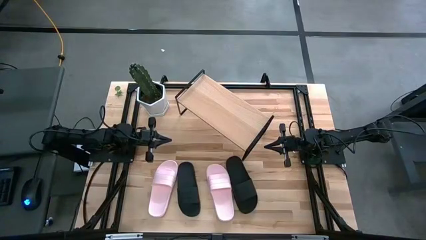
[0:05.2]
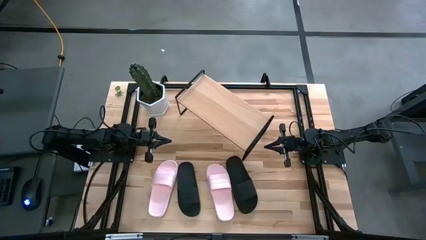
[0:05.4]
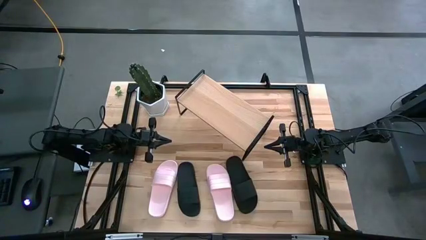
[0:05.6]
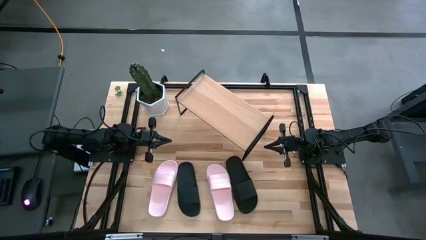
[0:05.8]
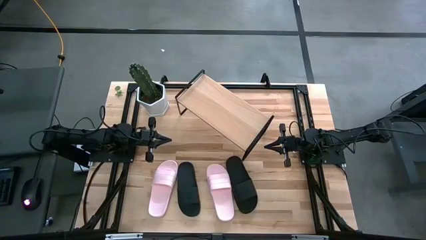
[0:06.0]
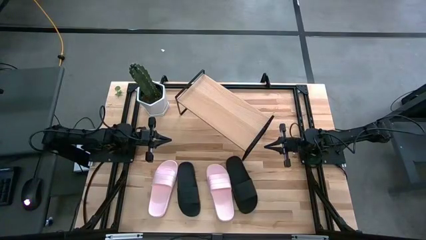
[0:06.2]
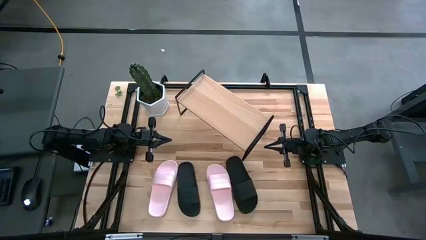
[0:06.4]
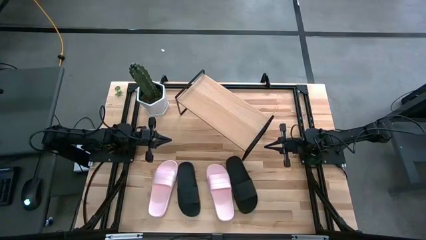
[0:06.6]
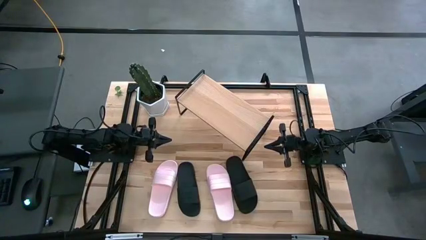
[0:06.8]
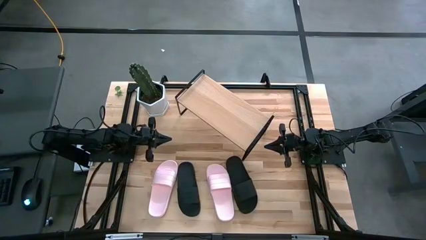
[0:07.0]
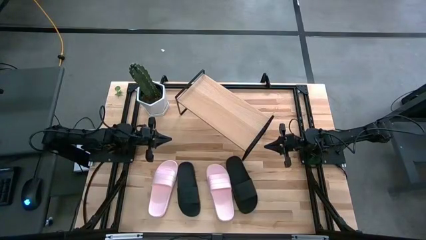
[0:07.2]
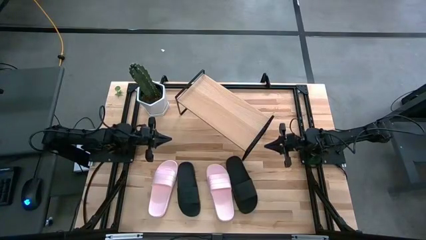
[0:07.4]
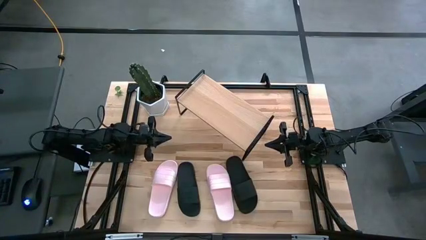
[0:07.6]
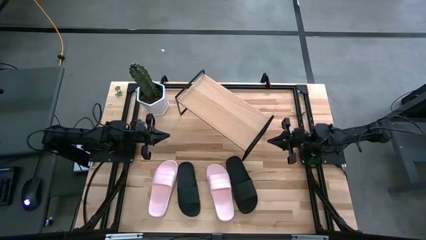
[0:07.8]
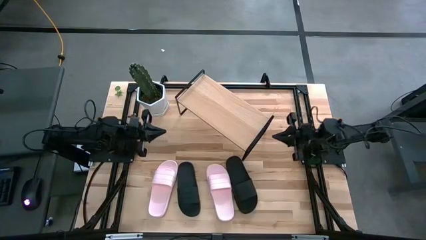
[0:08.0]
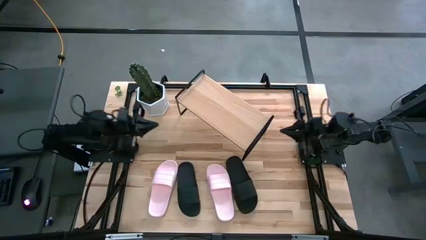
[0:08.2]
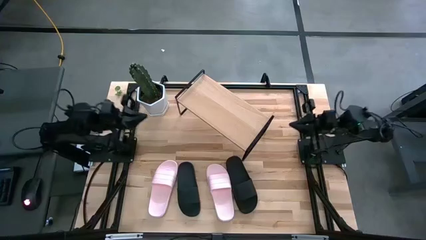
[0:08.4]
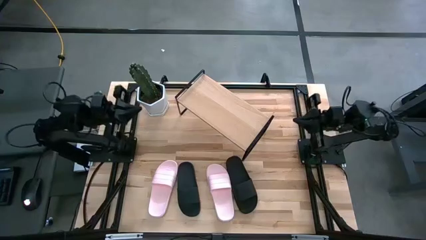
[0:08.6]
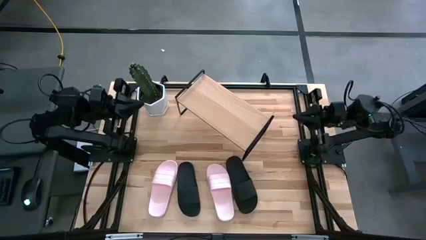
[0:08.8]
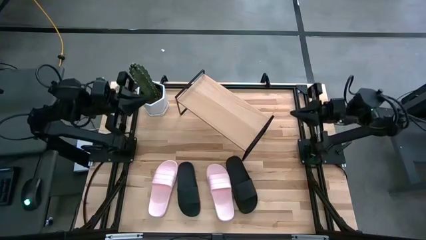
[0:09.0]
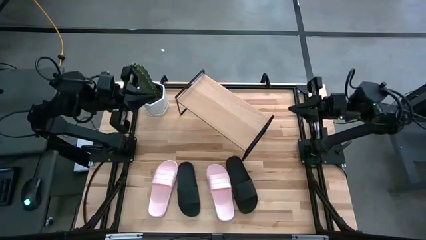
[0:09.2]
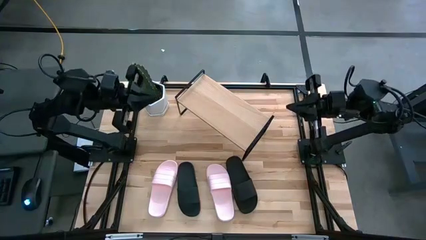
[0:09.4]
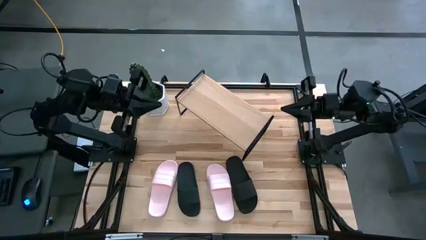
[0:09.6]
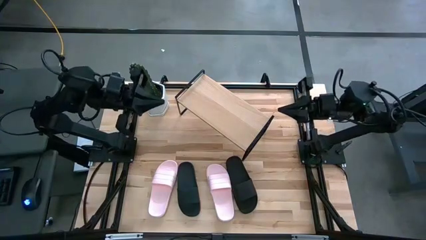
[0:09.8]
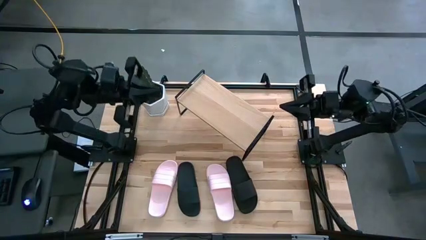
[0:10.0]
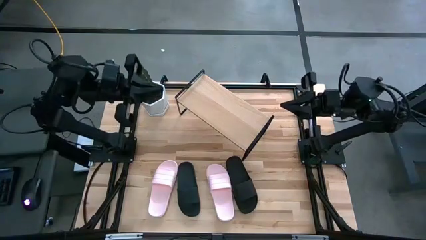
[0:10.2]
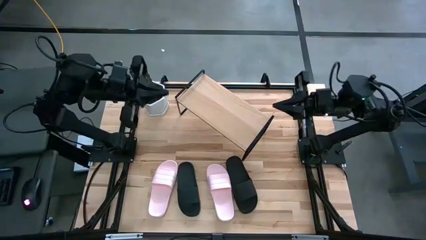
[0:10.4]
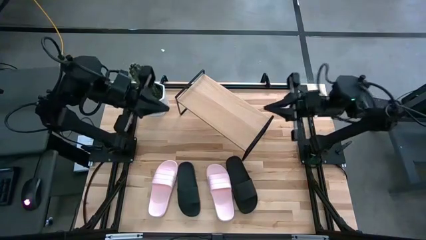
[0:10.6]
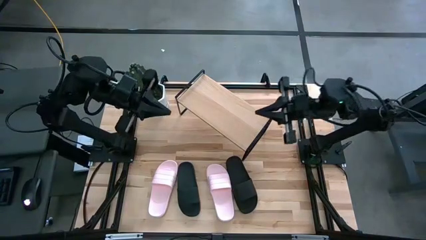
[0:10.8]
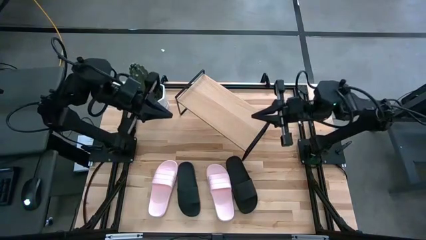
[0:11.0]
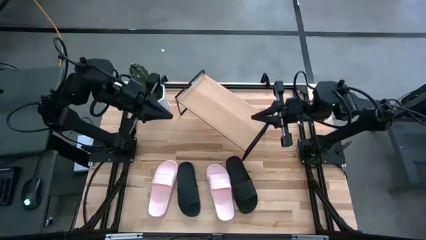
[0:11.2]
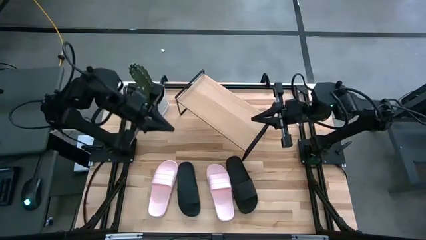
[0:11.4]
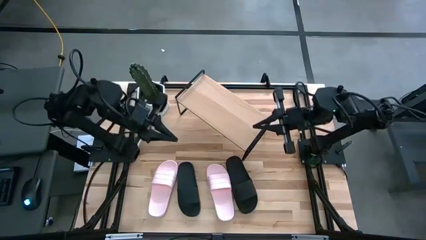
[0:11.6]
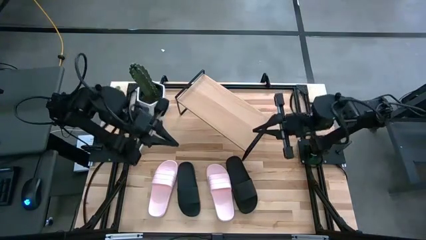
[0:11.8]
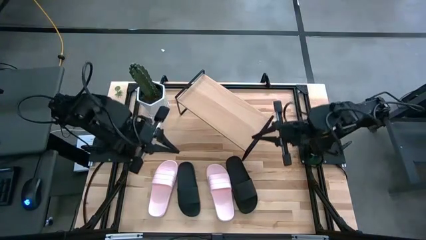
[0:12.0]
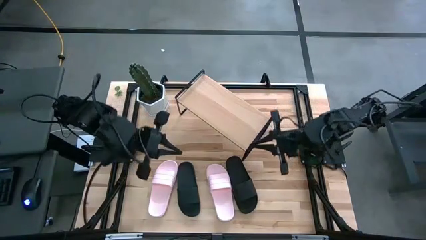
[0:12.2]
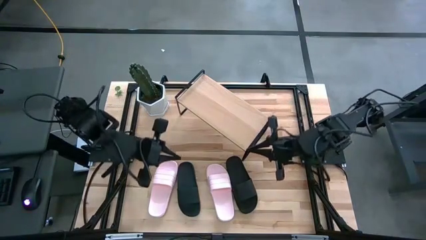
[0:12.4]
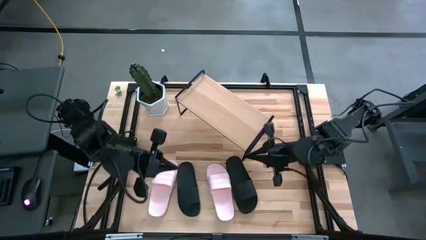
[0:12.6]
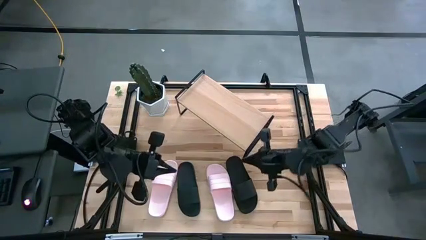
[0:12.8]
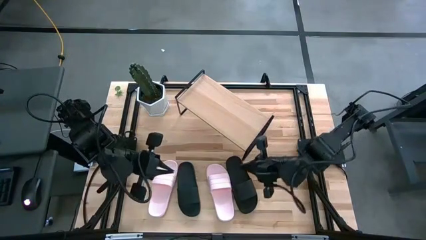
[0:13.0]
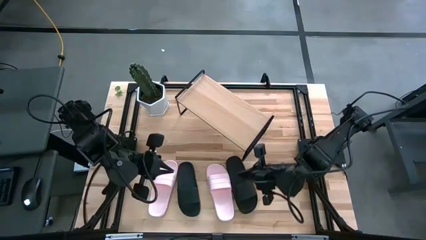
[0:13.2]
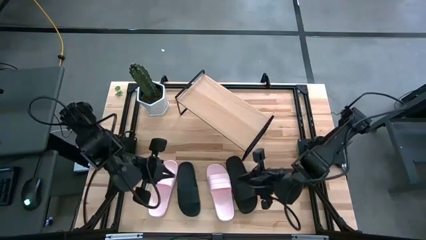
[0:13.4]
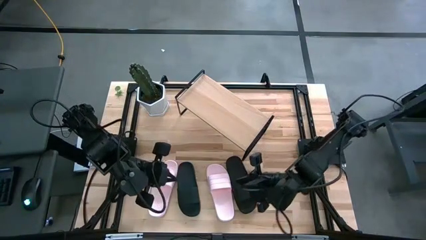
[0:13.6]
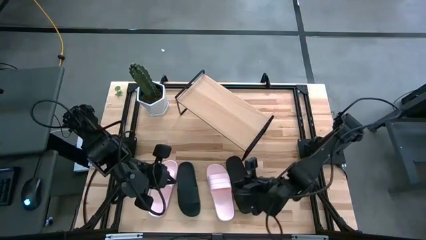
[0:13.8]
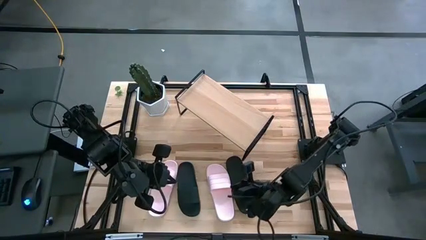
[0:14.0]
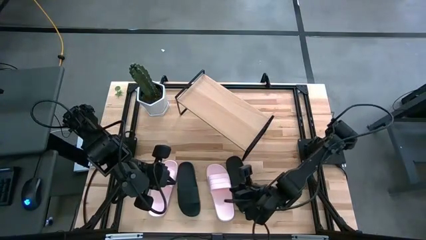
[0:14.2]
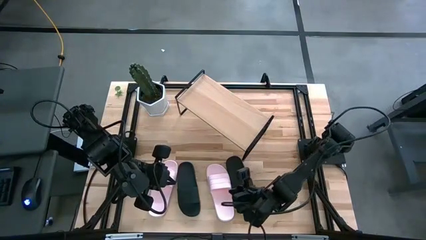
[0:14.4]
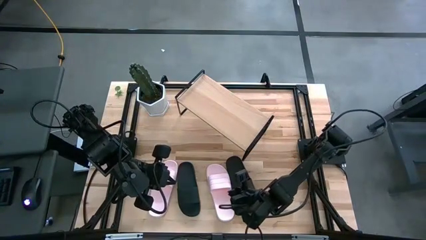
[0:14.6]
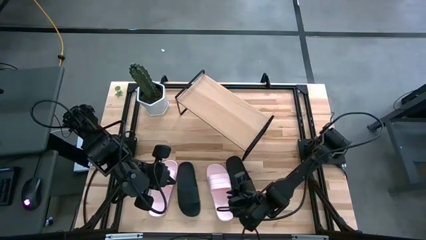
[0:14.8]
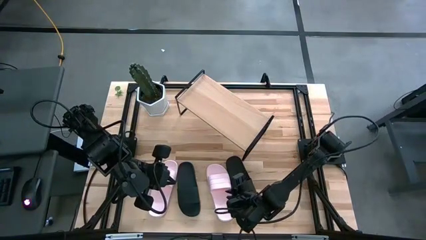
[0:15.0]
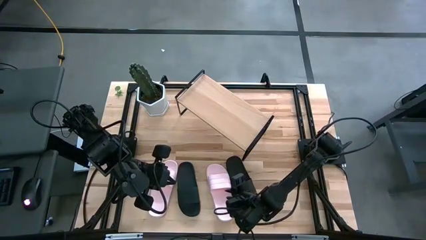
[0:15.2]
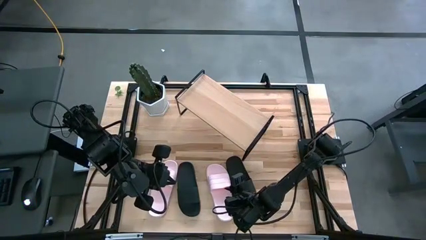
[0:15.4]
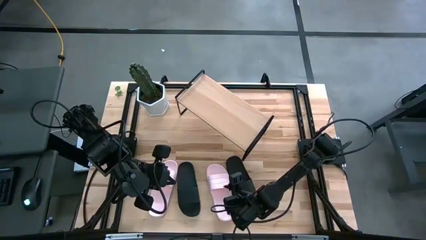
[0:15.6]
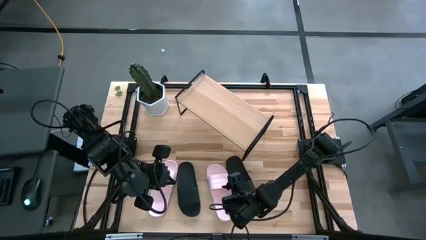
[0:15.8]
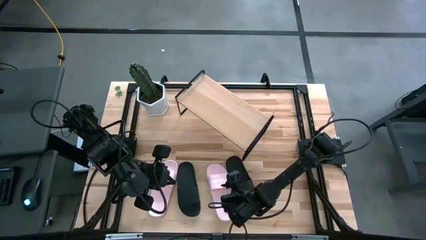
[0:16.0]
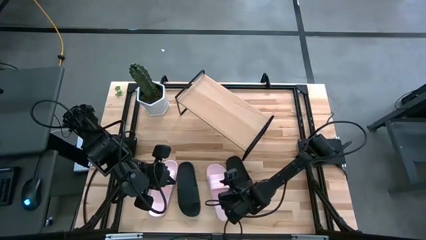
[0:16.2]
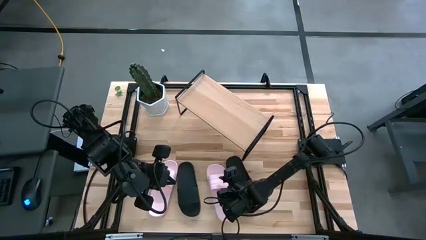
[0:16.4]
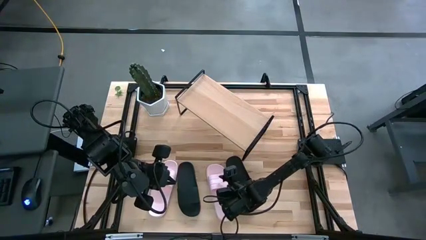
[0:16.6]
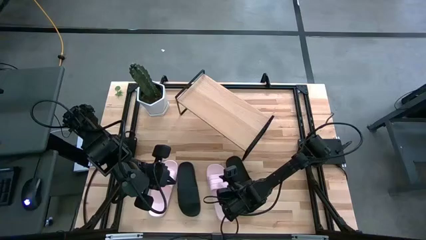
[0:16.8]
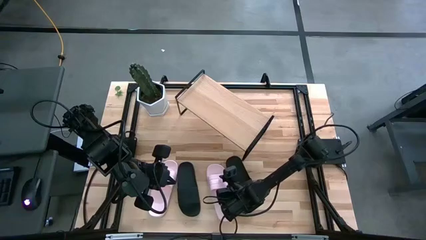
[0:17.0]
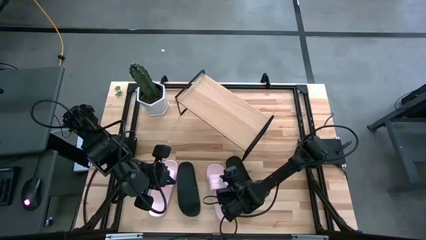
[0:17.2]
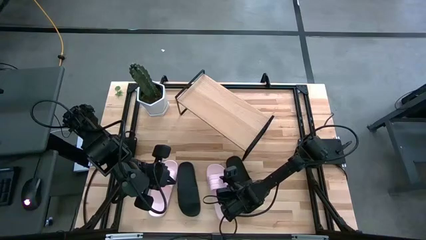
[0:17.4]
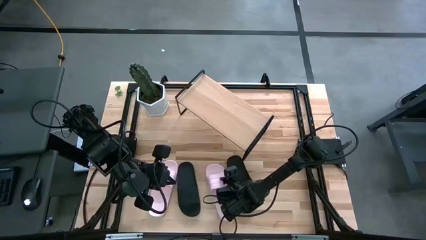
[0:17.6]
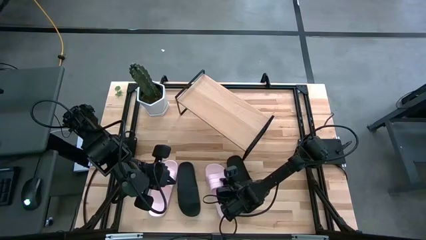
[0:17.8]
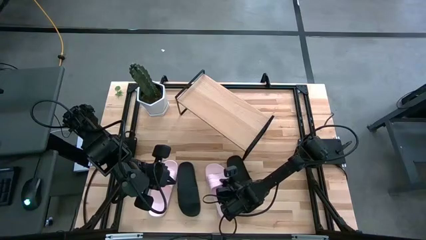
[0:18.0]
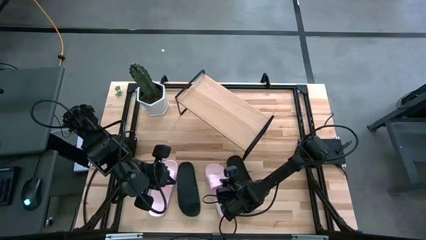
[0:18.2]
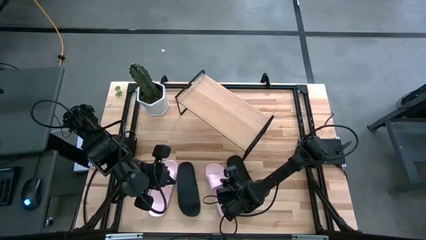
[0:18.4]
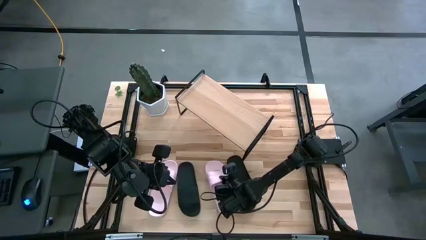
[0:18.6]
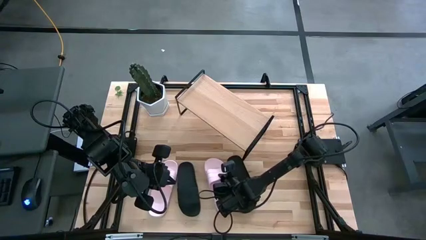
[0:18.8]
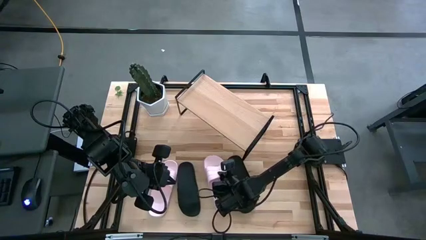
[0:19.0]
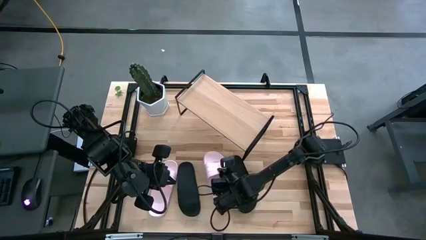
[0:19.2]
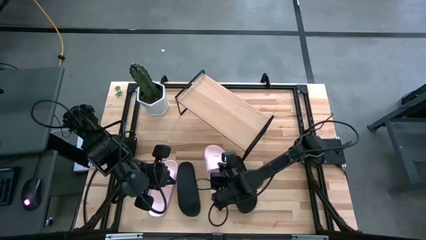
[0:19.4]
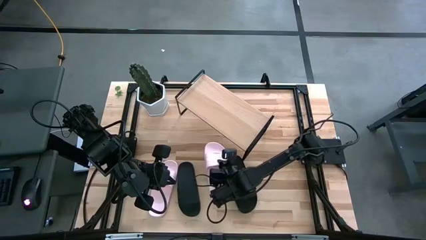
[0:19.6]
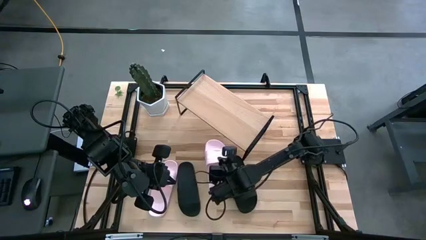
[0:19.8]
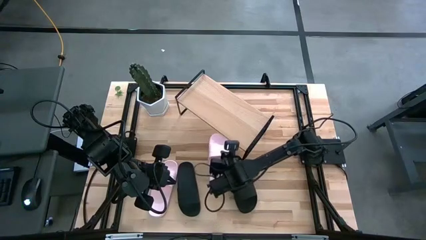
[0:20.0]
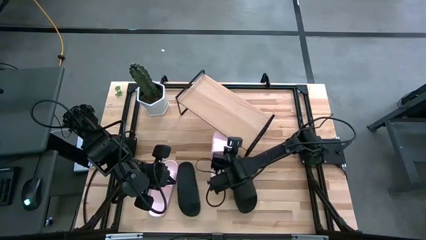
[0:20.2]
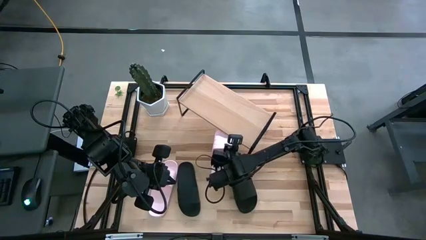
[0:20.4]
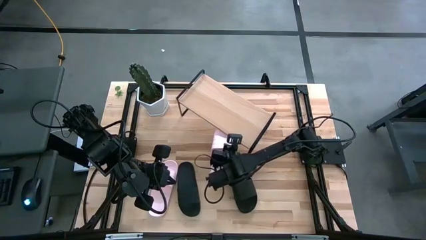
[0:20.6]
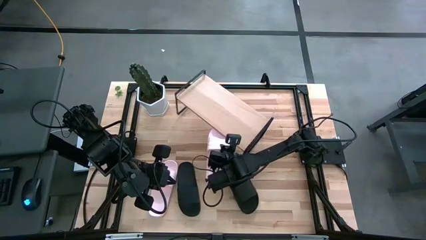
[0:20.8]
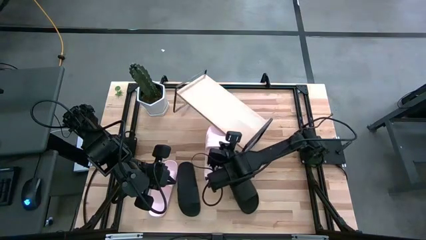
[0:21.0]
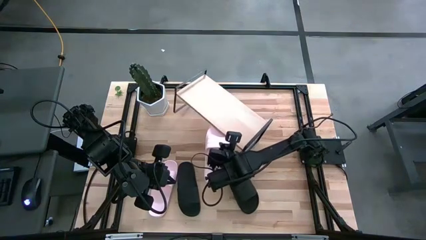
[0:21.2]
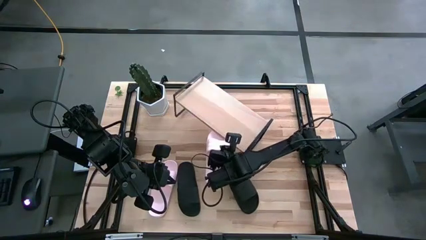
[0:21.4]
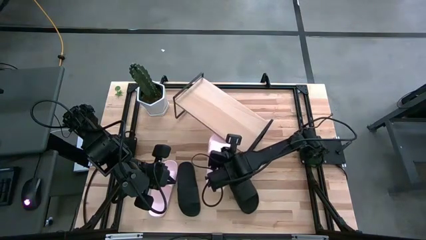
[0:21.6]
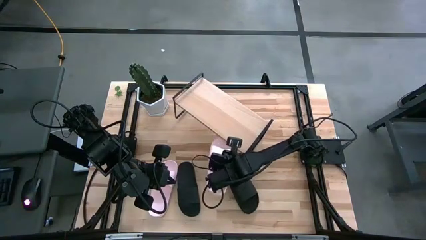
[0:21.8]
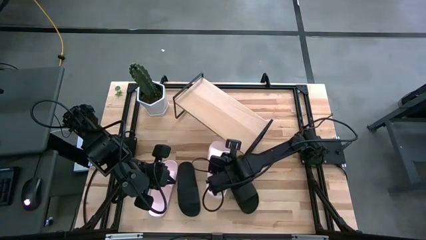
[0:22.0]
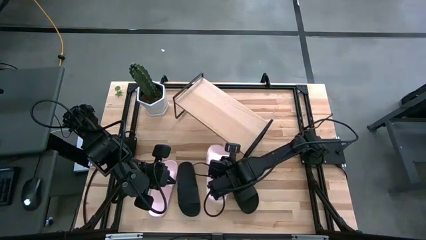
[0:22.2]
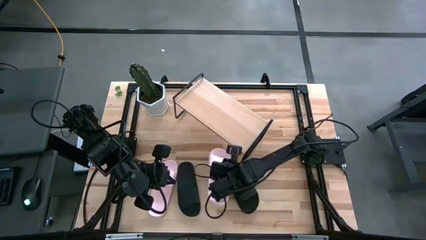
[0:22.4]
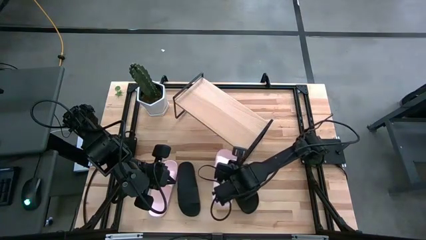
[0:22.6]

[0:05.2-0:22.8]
Task: Pick and place slides into the shelf
Put the right pink slipper on the shelf
